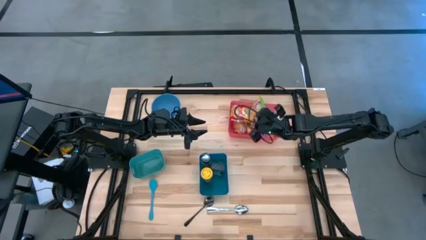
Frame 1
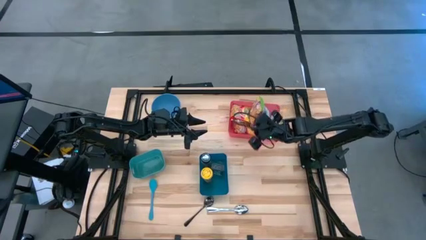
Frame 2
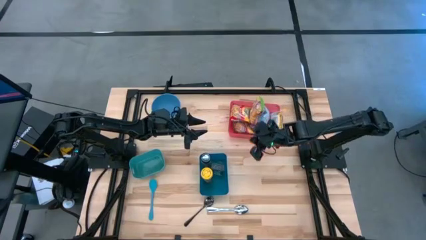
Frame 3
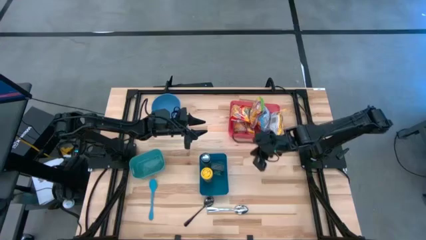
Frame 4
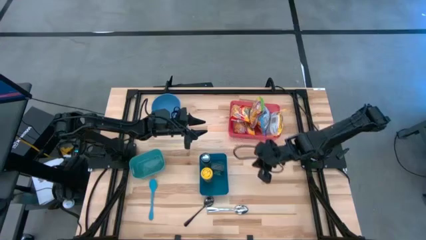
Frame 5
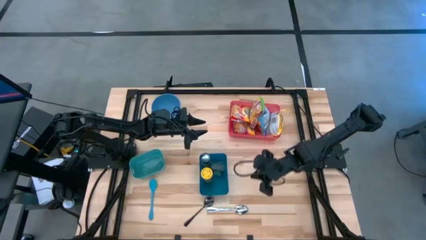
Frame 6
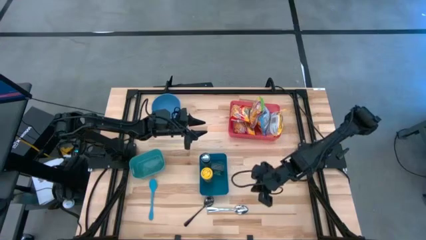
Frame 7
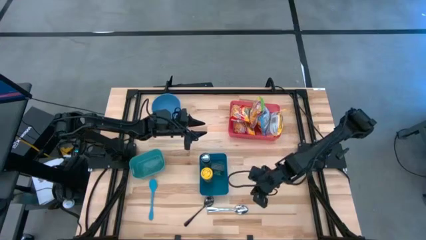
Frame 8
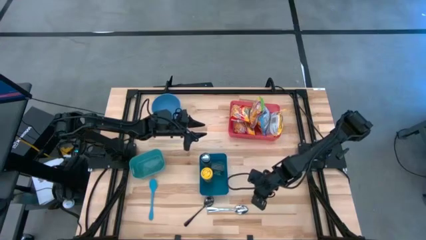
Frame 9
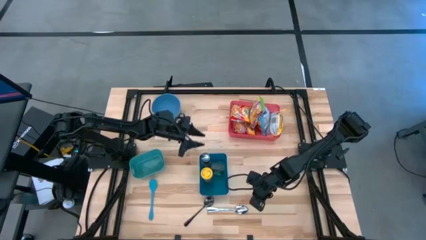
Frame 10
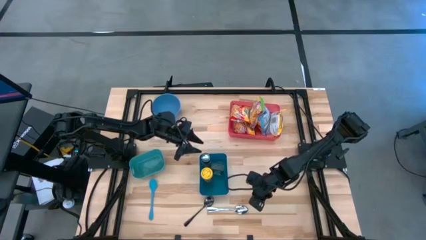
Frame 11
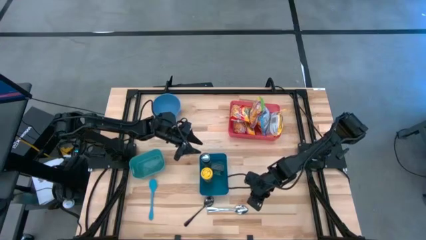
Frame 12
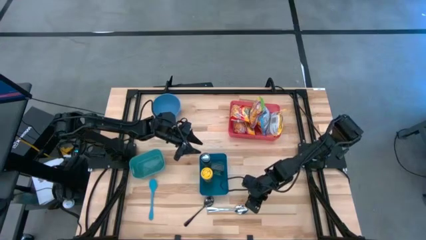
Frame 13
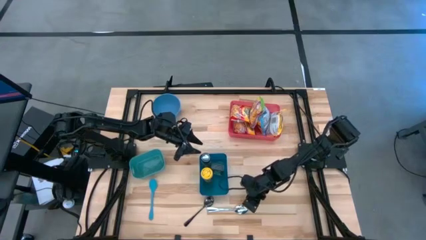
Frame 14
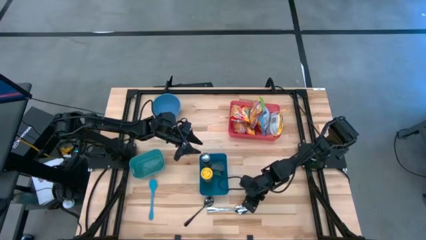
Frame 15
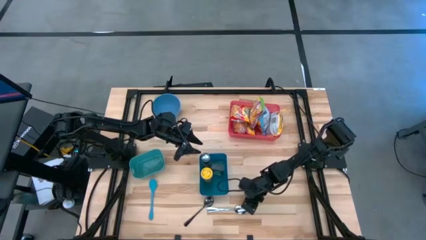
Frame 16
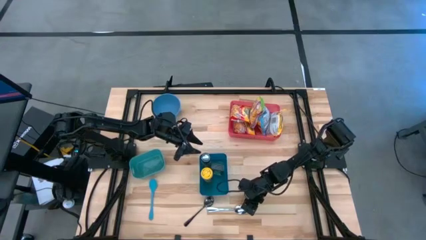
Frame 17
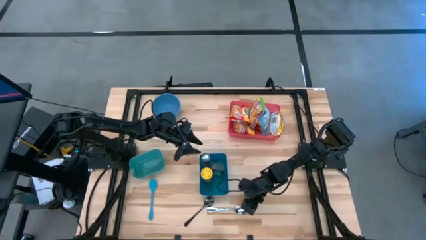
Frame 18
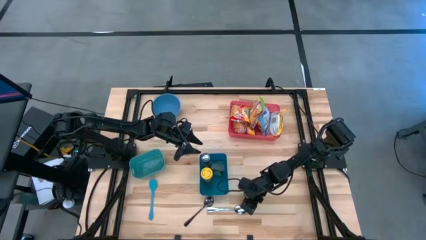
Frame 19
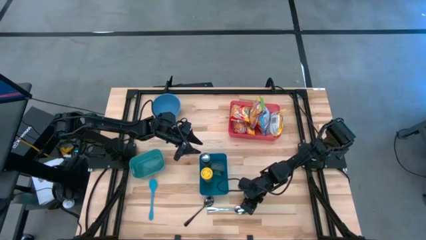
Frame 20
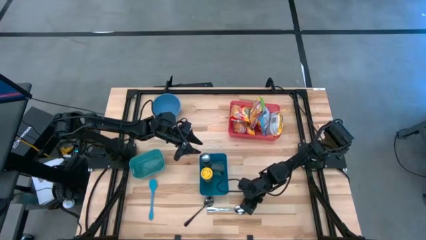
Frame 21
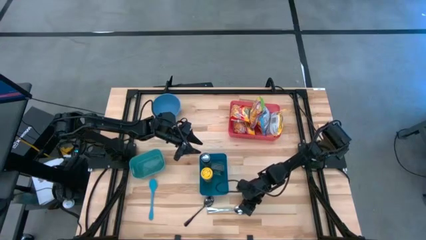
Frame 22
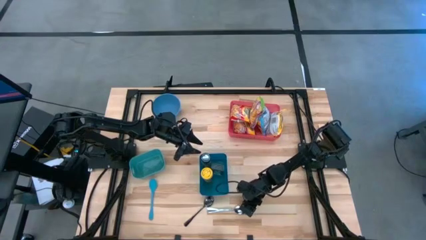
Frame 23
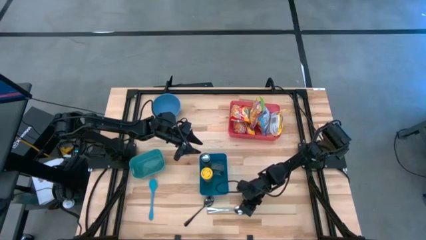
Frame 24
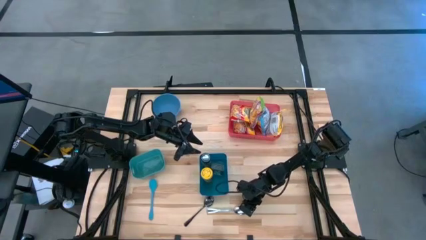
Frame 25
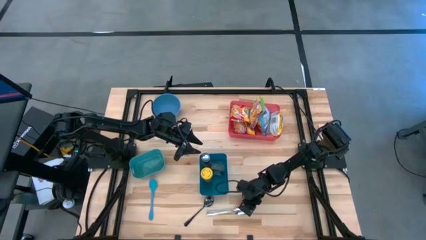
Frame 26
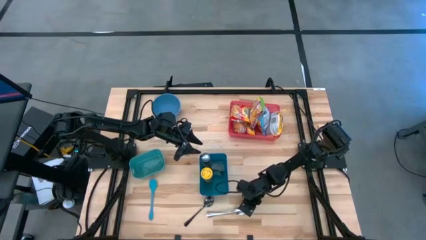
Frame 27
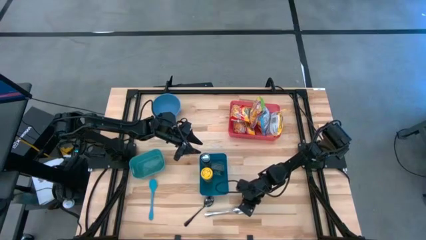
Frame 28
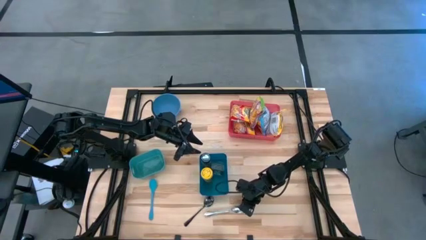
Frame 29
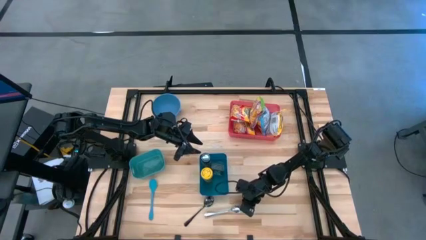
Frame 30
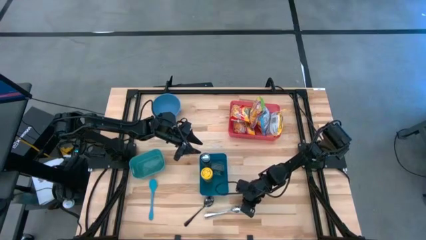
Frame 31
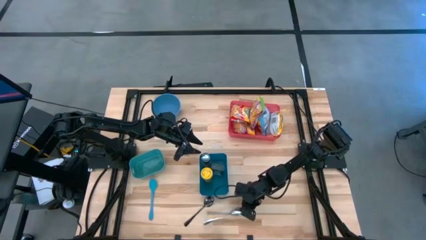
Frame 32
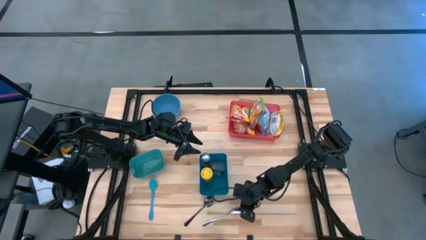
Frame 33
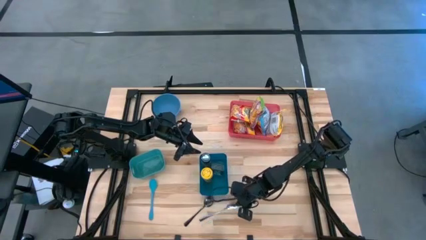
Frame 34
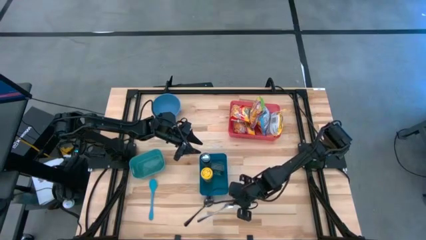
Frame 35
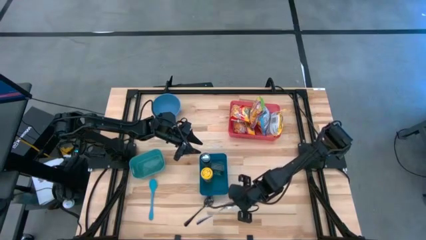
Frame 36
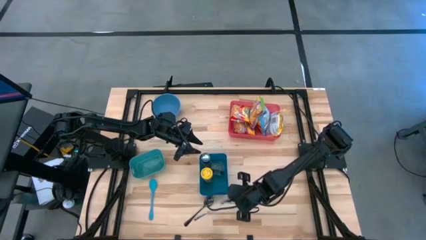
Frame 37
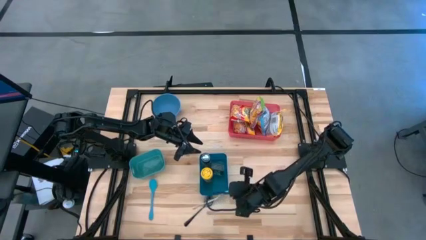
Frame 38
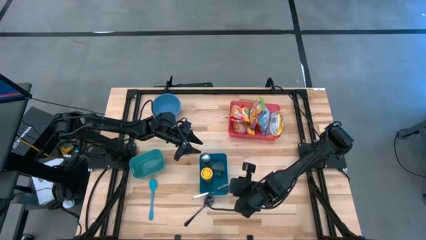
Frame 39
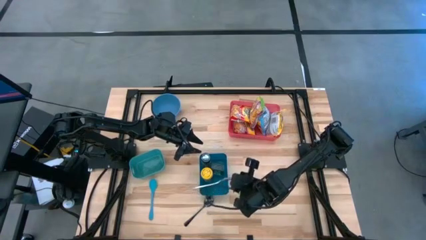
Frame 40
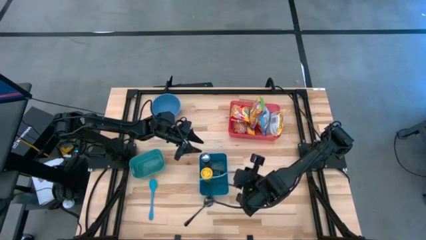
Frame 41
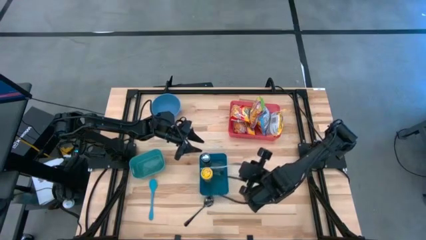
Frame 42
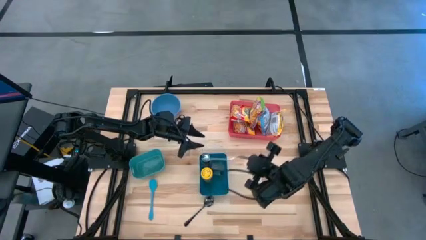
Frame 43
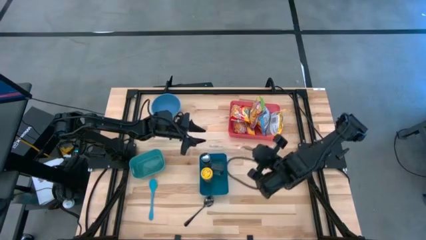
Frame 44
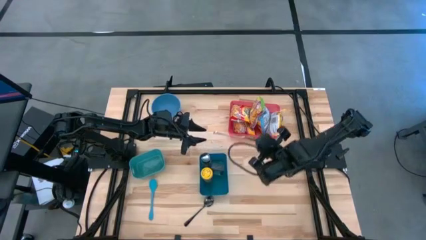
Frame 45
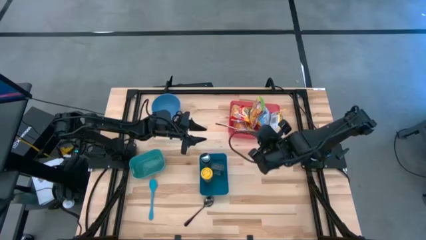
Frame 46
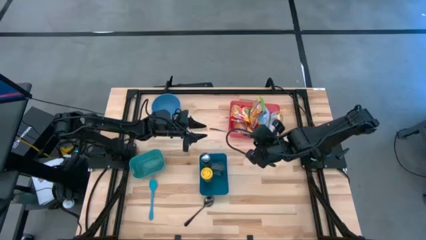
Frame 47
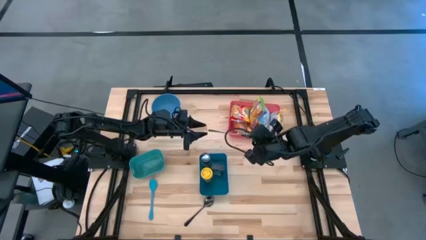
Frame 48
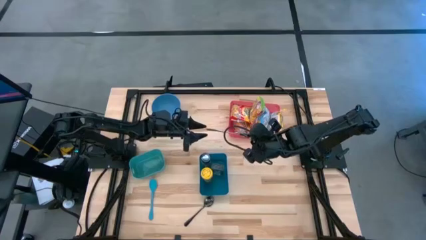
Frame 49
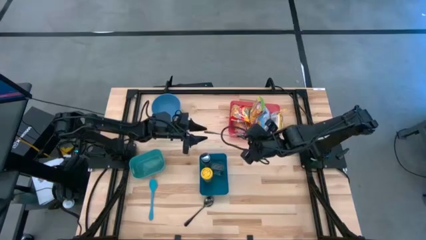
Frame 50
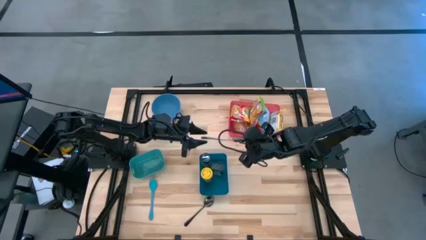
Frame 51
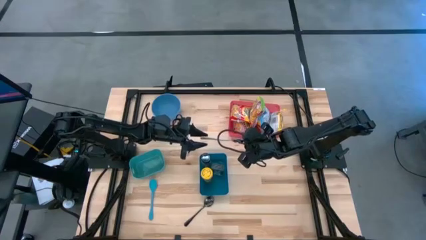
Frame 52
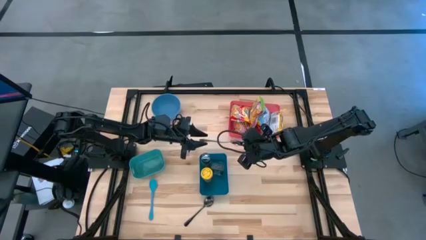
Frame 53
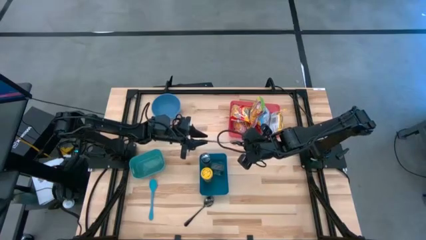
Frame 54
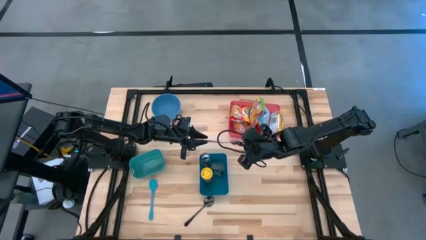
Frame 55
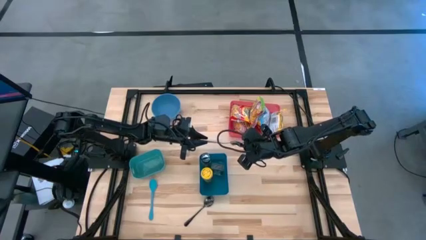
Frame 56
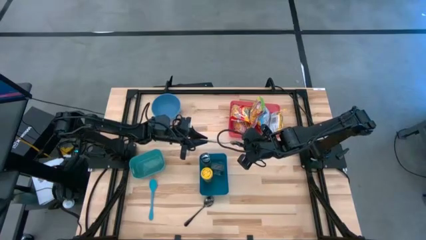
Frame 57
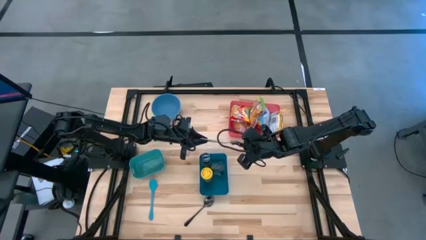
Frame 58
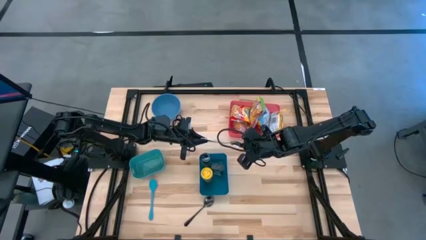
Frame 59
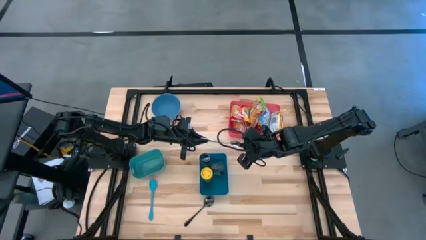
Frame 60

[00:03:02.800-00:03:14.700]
Task: Pick & Place Food Item
Put the silver spoon into the green bin

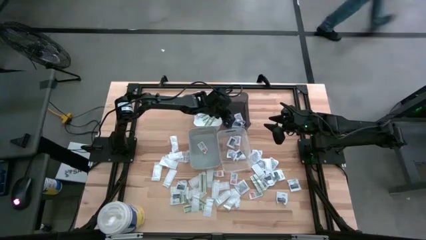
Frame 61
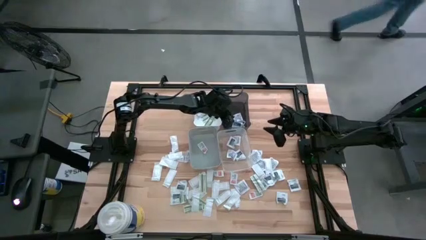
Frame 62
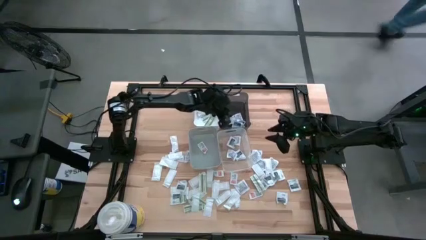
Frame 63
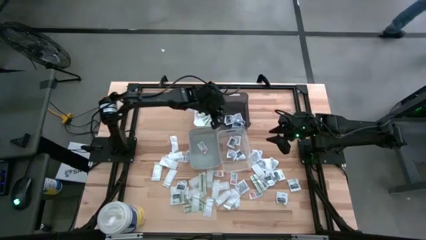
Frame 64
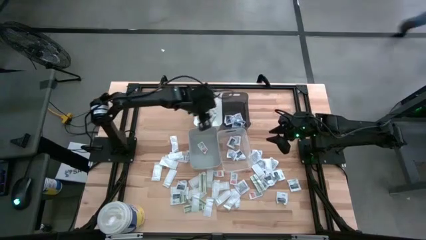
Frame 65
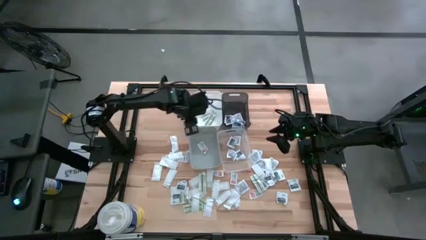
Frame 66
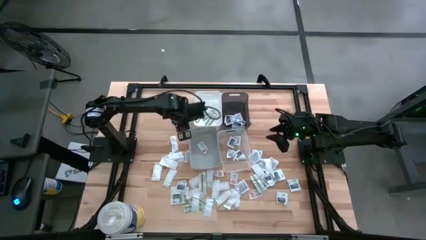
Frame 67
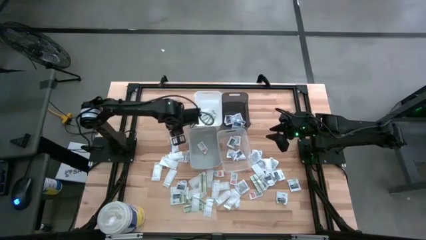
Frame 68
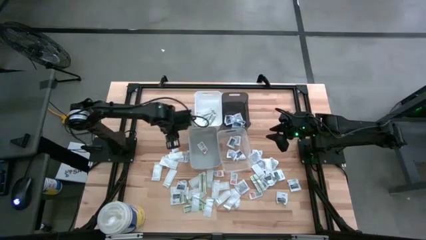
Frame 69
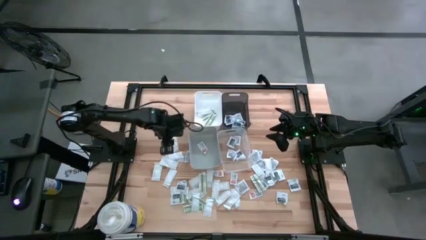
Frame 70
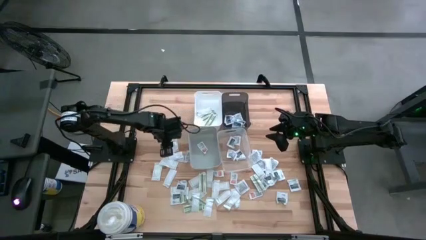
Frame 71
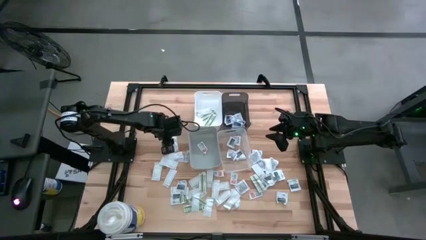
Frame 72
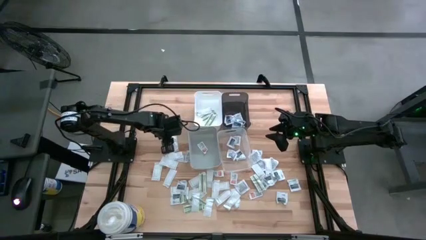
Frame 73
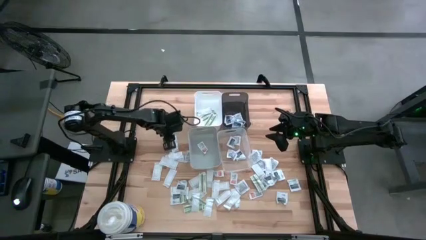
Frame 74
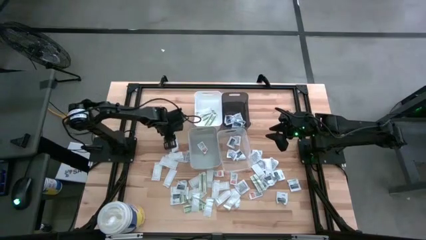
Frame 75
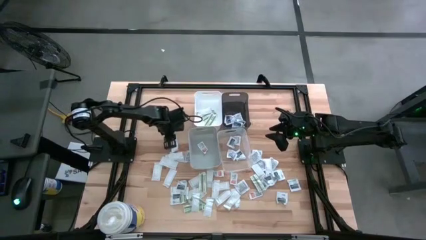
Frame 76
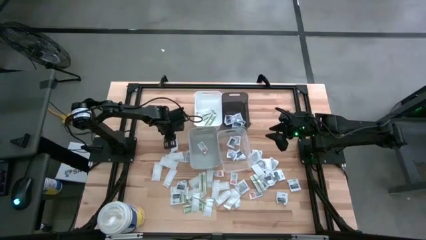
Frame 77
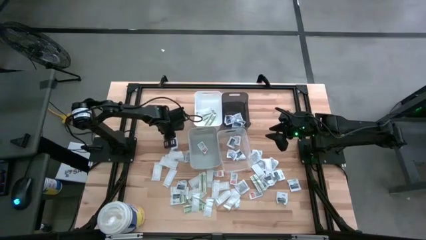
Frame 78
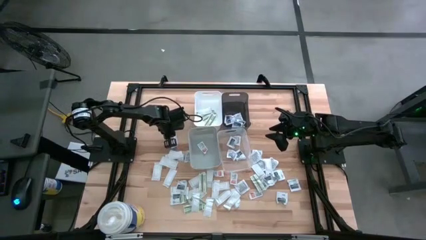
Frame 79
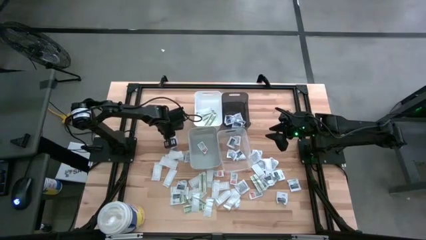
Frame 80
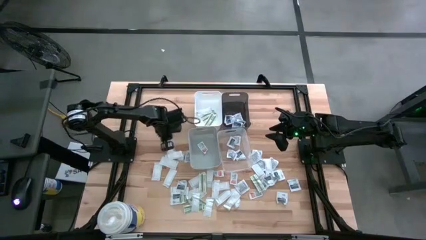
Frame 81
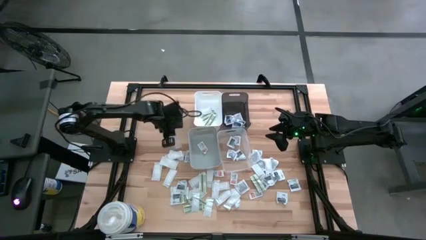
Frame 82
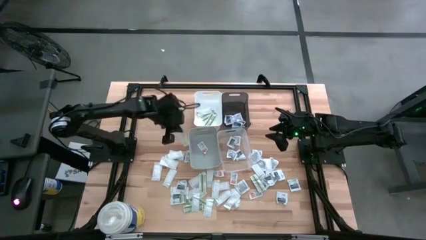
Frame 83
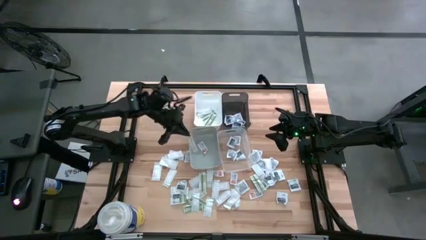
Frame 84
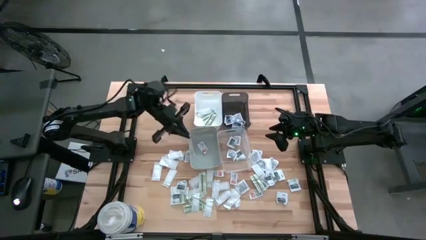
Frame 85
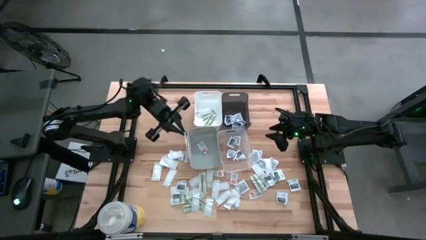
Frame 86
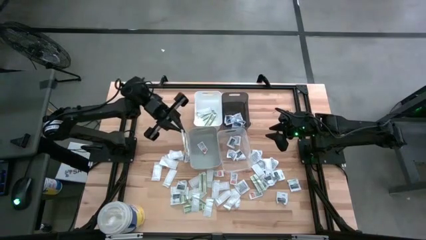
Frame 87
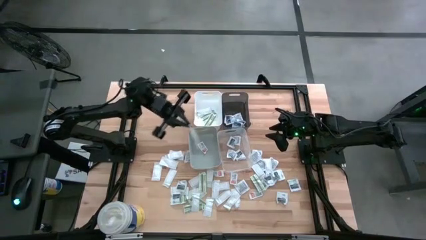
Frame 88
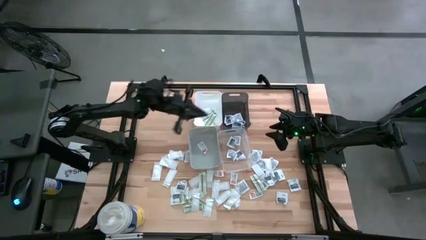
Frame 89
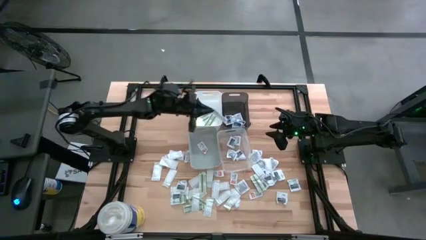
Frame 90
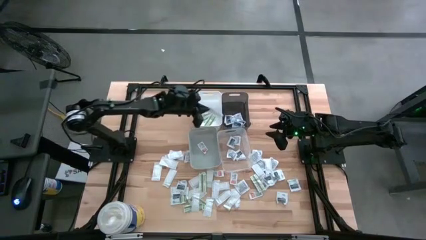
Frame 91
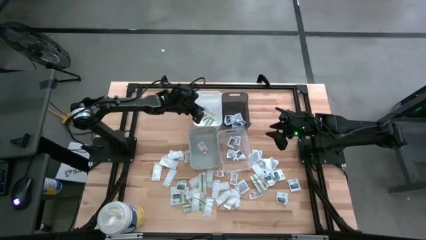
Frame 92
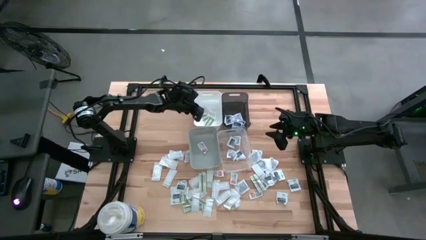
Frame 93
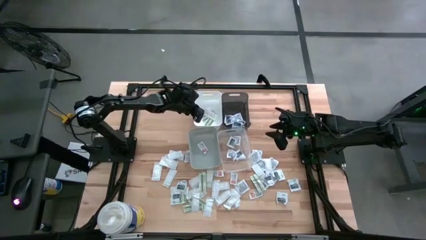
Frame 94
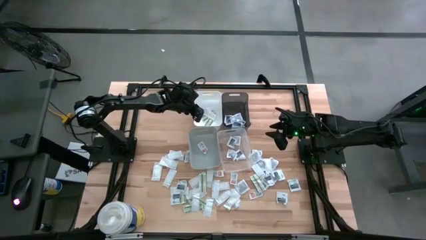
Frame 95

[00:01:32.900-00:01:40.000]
Task: Pick & Place First Aid Supplies
Put the green bandage pack into the white bin
